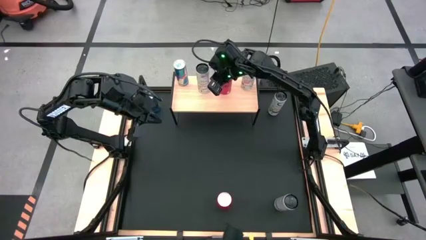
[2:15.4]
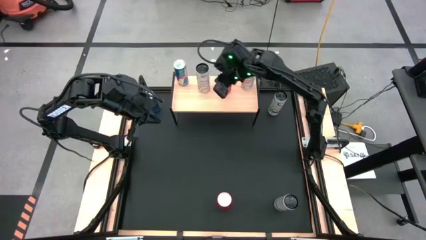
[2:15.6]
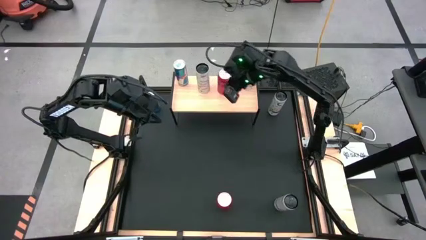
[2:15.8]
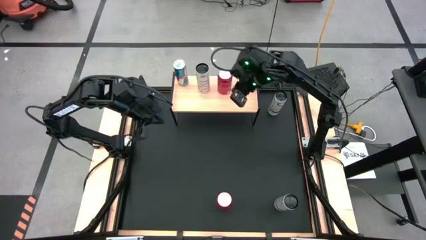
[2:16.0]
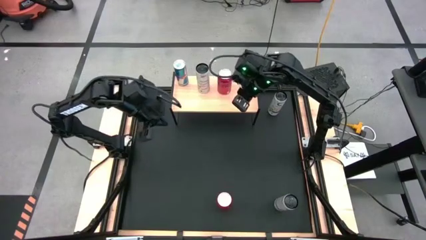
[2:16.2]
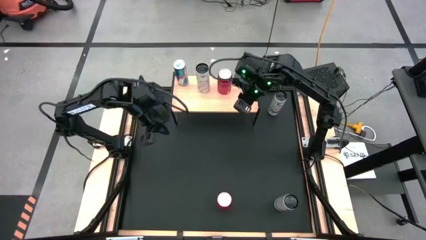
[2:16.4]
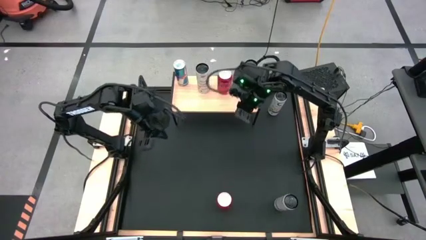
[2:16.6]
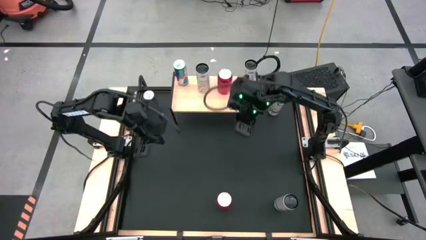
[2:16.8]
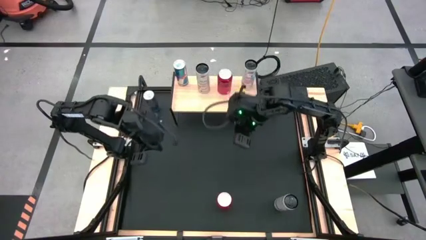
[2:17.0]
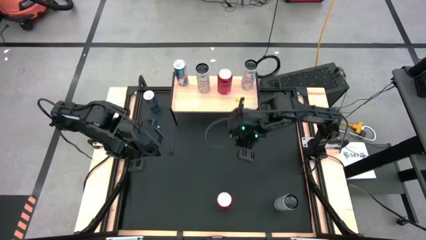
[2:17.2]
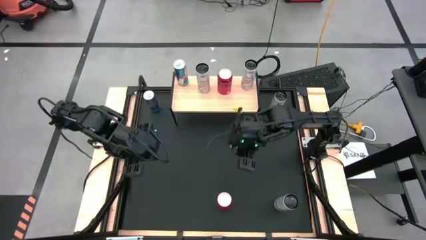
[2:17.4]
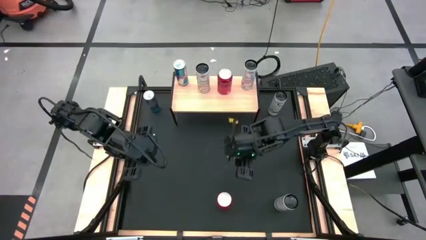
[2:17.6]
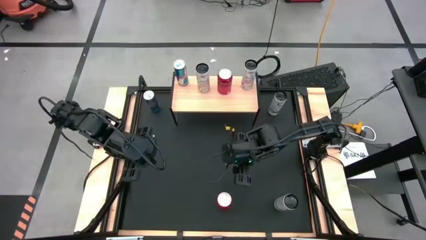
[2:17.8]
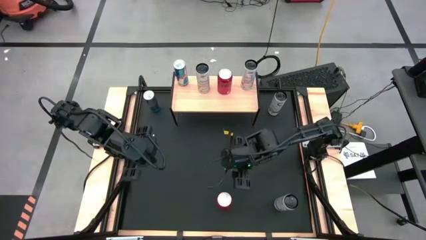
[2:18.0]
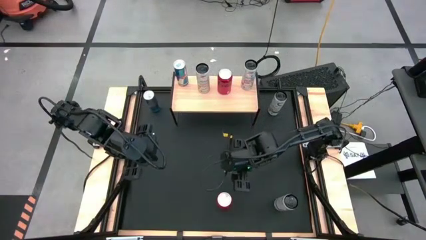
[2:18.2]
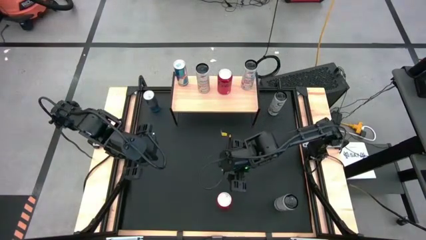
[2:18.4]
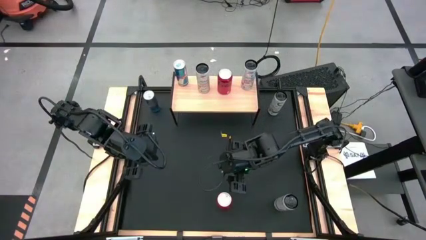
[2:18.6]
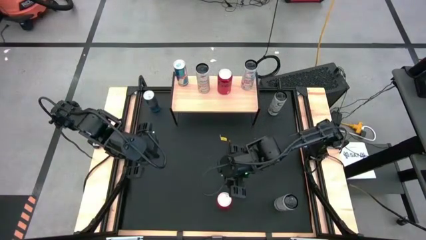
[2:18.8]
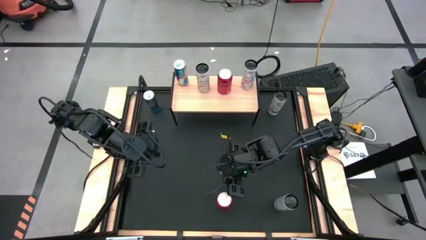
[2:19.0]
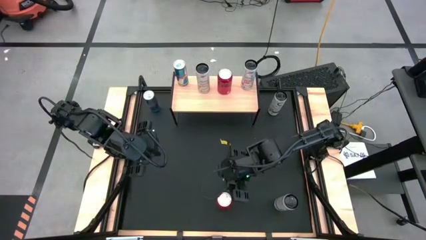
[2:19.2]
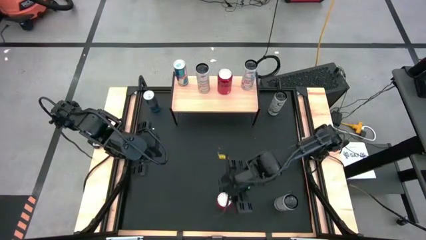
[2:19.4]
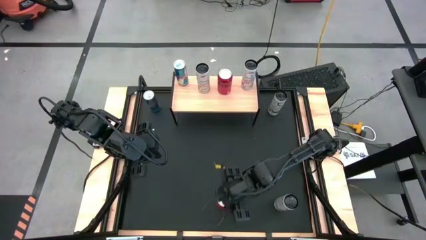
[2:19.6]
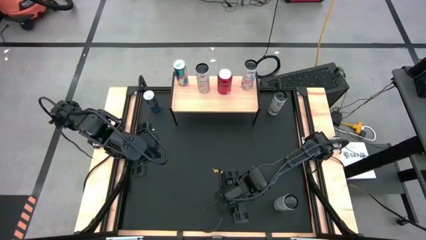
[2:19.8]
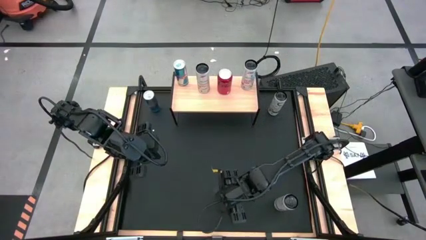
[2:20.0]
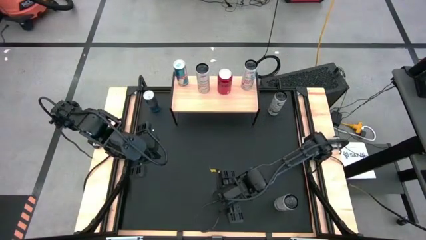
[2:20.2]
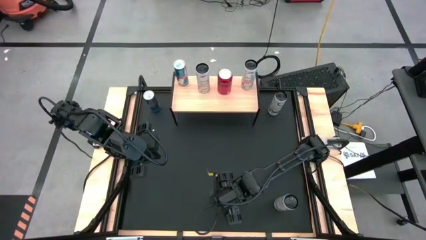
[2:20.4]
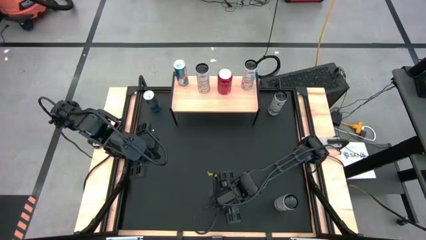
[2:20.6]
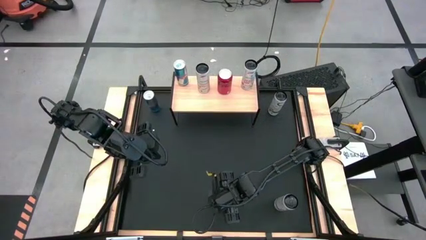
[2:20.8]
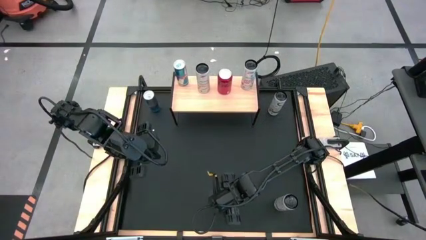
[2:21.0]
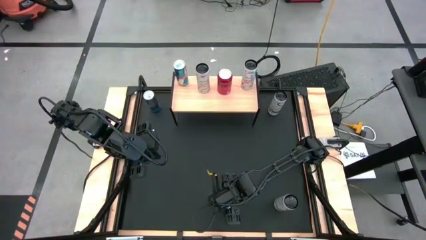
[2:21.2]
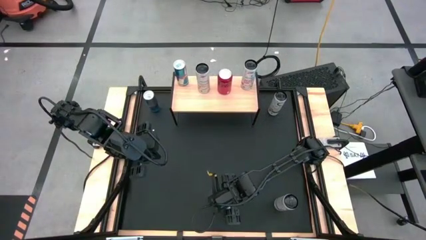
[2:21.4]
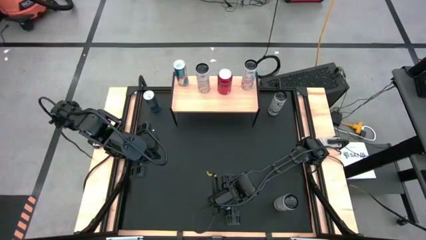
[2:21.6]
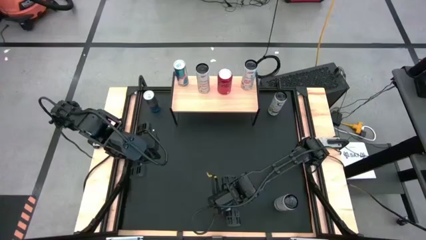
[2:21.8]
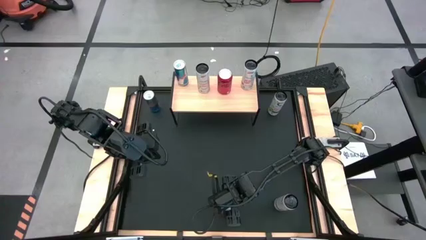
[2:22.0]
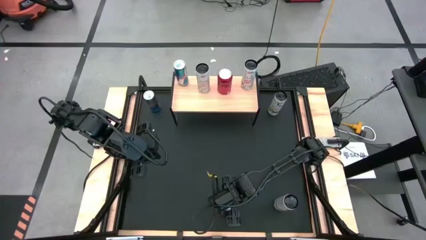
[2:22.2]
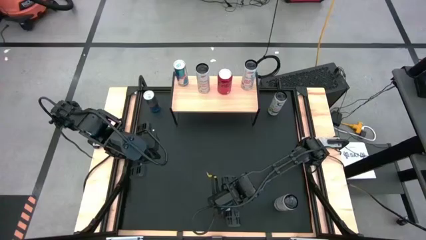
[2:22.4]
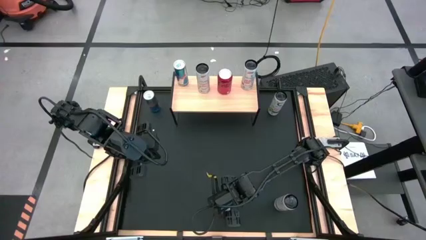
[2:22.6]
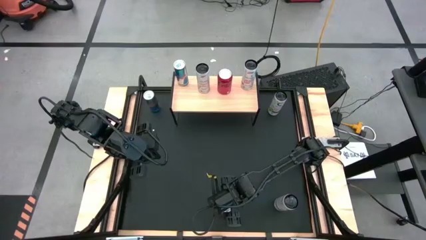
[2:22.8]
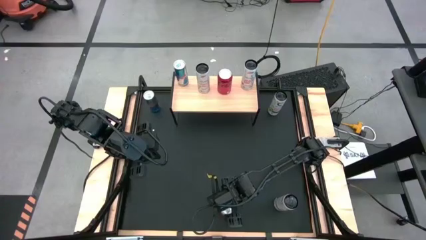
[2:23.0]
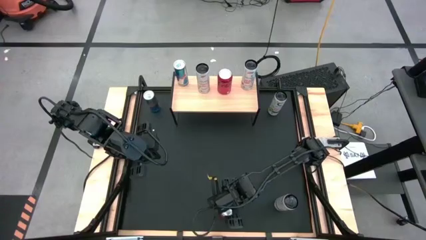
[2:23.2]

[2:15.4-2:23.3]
Task: Place canned beverage on shelf
Put the red black soda can on the shelf aligned with the other red black soda can
